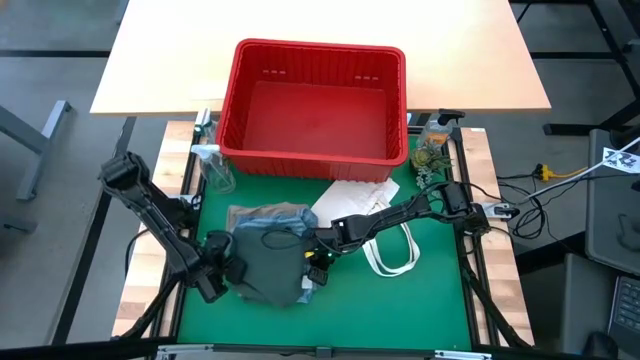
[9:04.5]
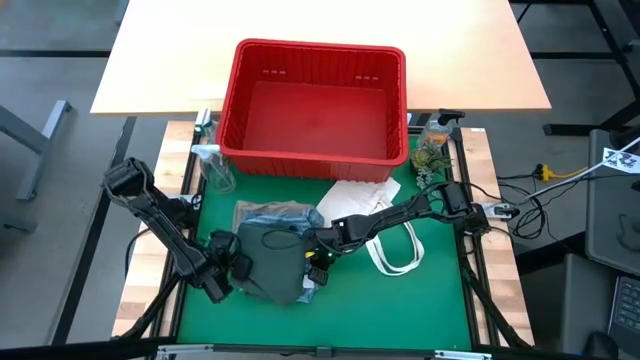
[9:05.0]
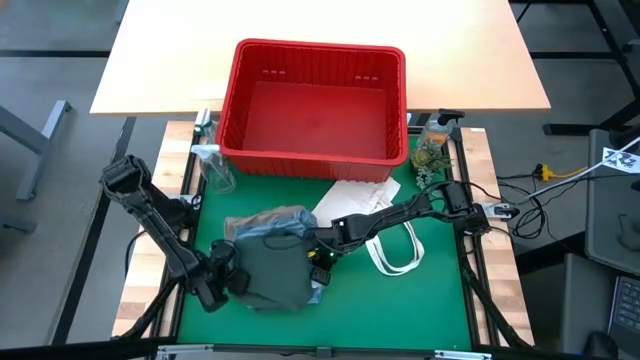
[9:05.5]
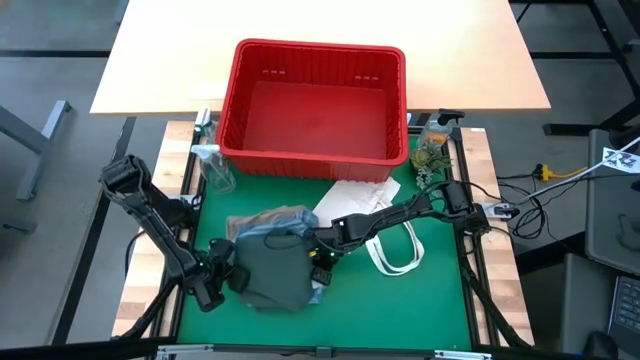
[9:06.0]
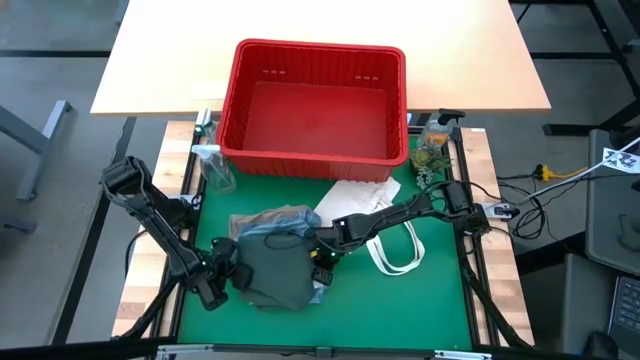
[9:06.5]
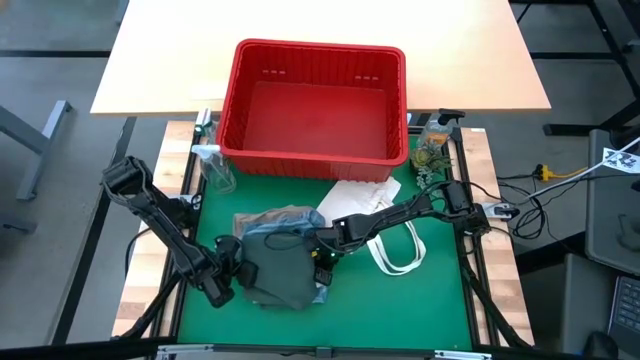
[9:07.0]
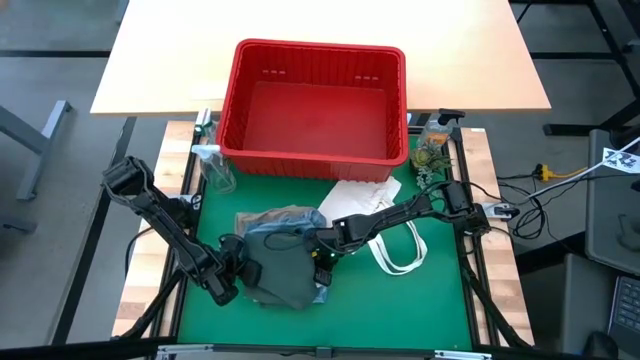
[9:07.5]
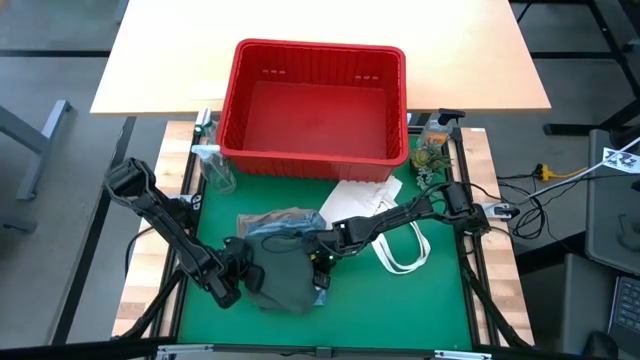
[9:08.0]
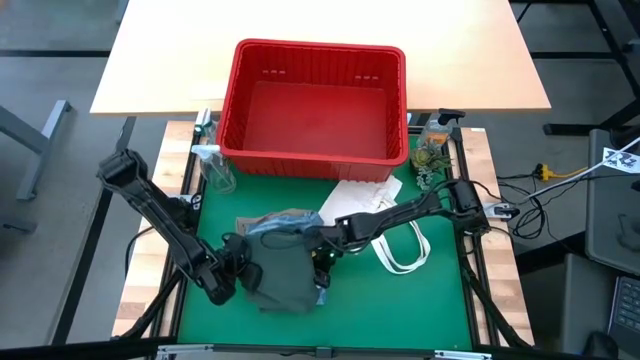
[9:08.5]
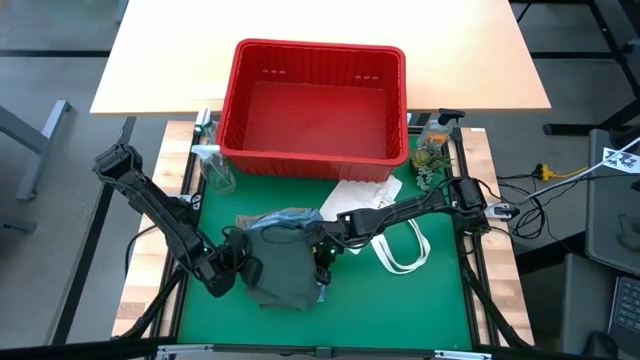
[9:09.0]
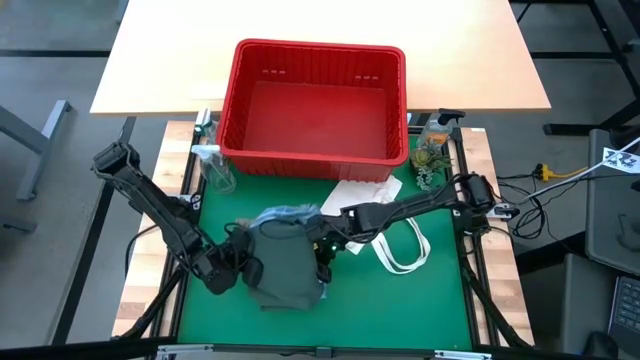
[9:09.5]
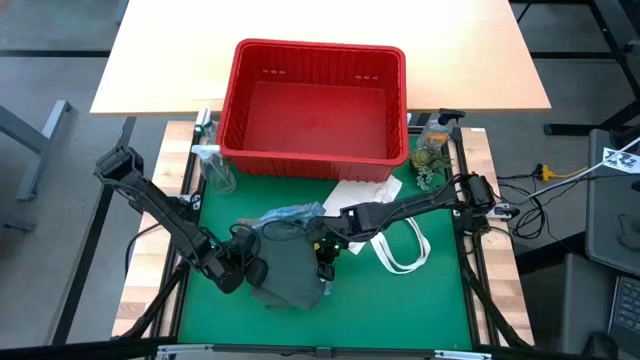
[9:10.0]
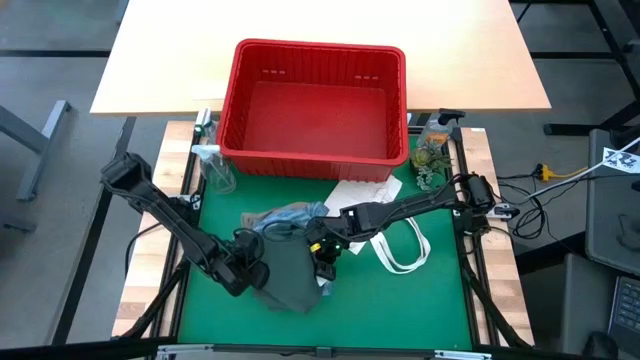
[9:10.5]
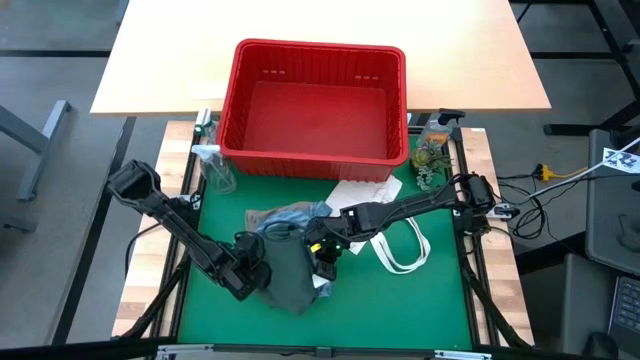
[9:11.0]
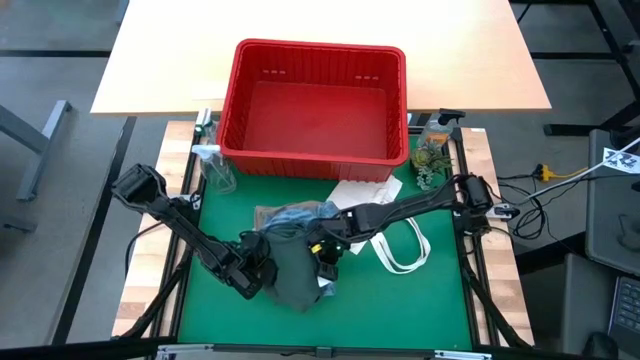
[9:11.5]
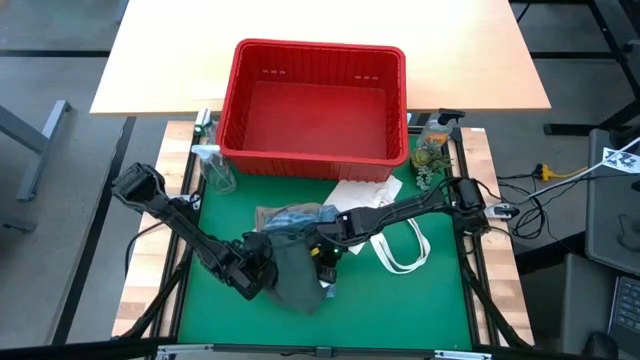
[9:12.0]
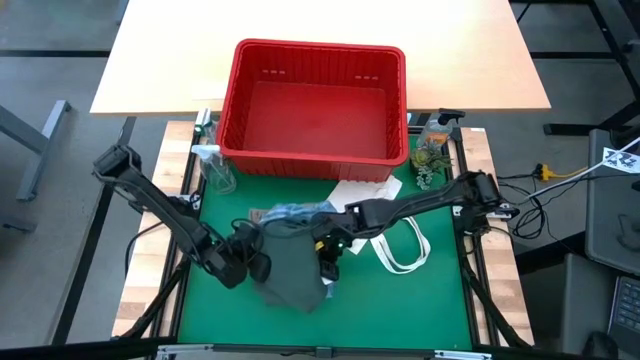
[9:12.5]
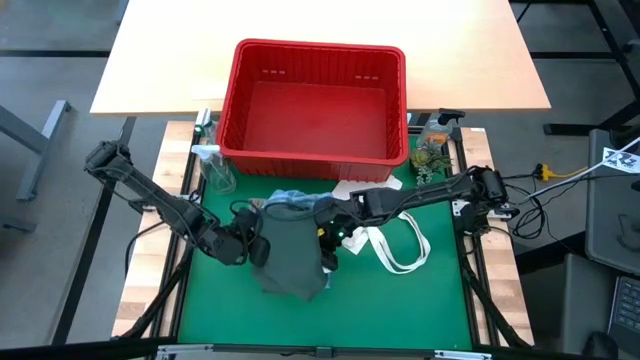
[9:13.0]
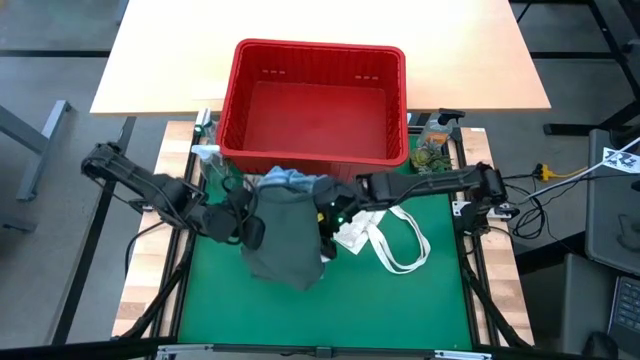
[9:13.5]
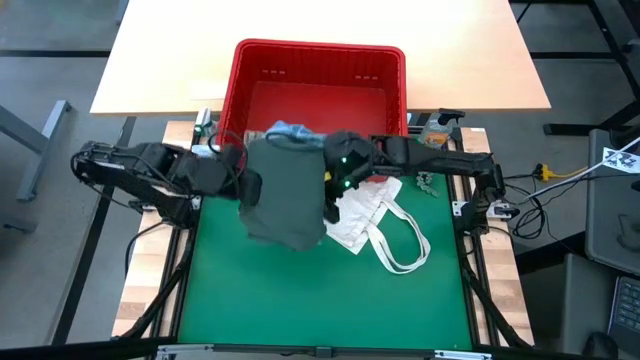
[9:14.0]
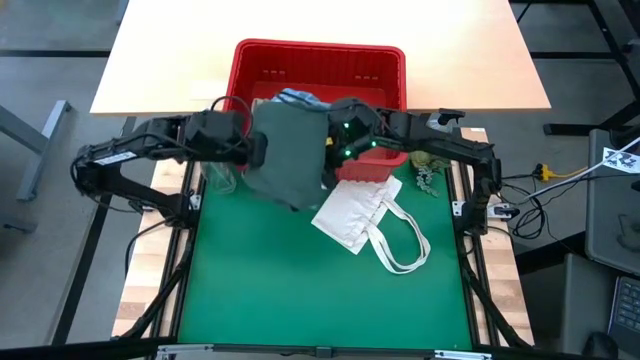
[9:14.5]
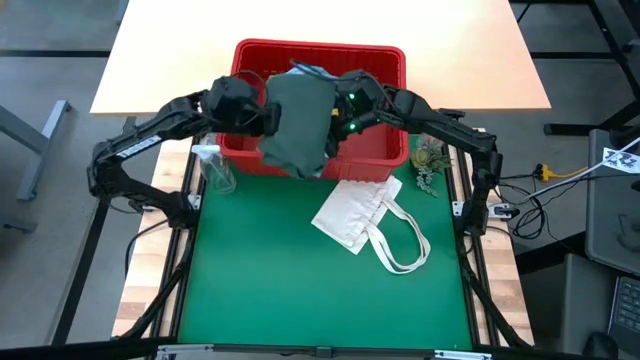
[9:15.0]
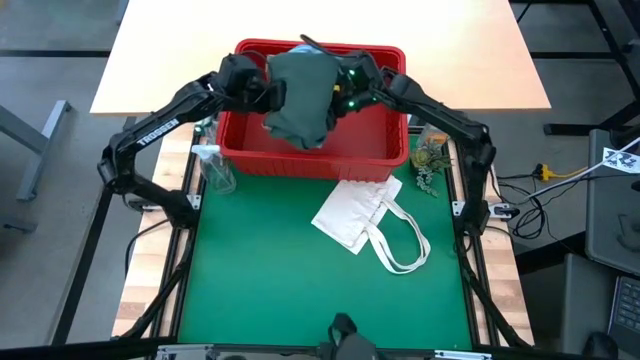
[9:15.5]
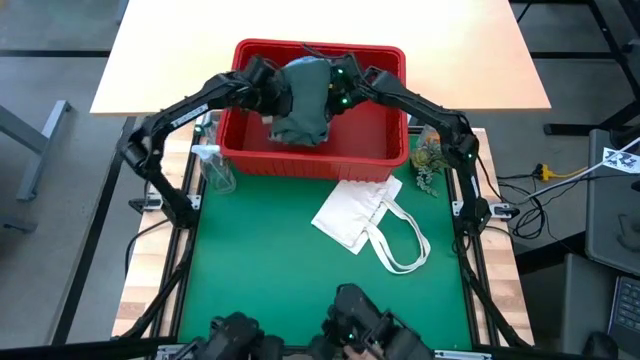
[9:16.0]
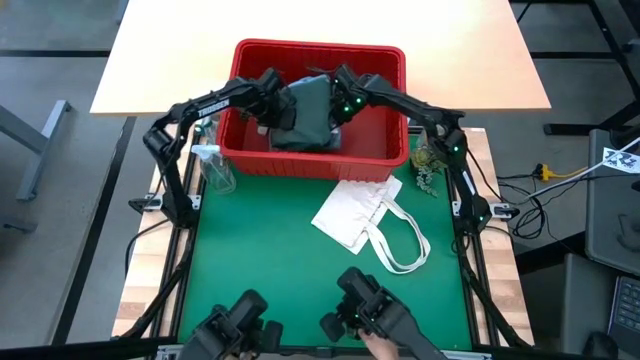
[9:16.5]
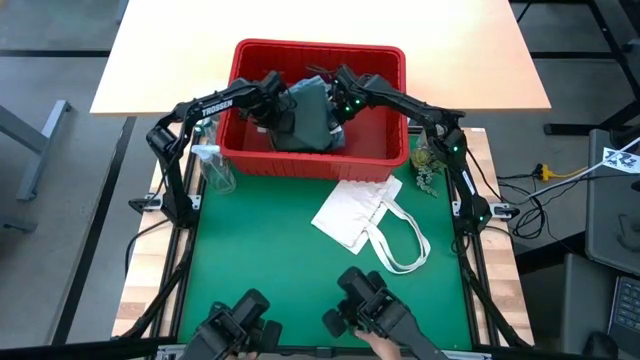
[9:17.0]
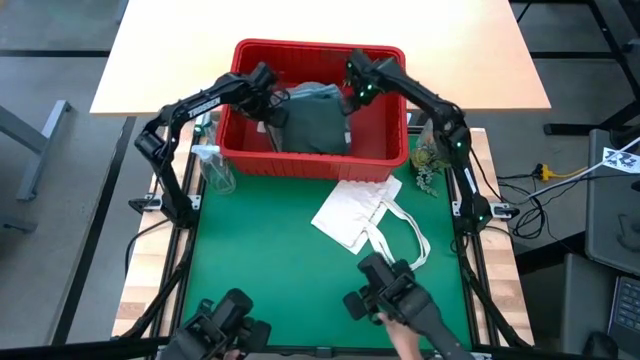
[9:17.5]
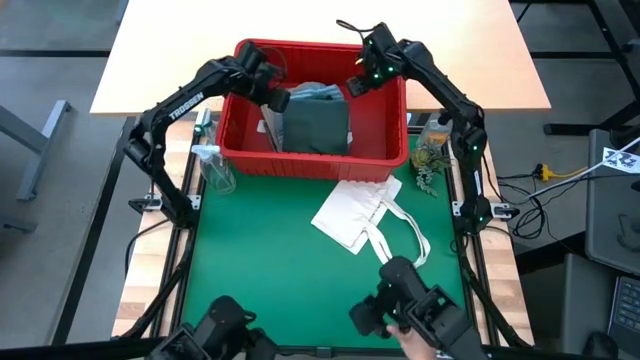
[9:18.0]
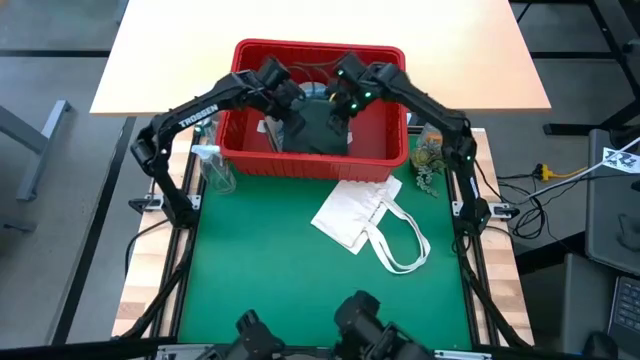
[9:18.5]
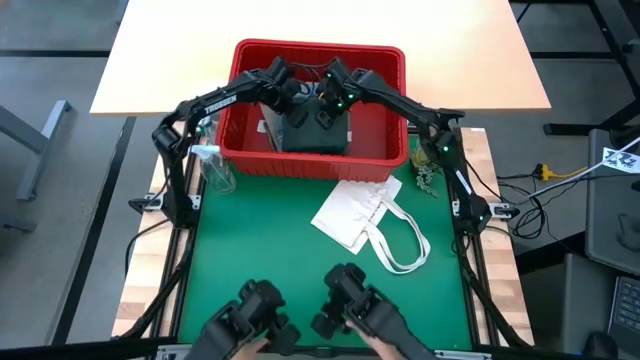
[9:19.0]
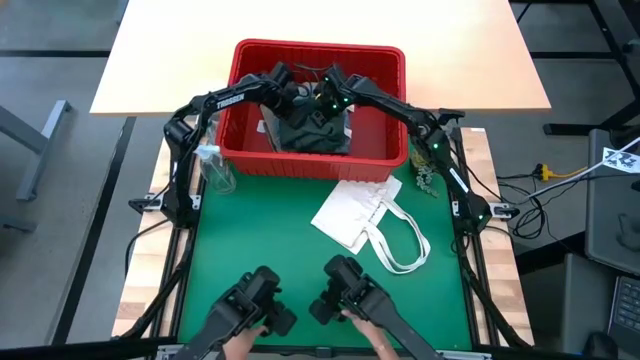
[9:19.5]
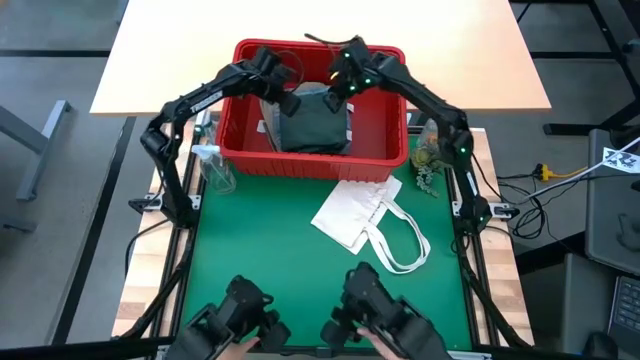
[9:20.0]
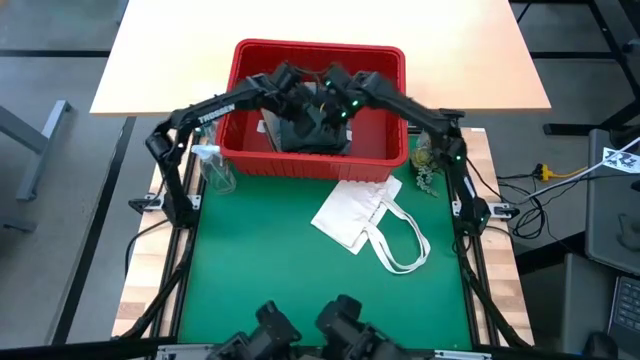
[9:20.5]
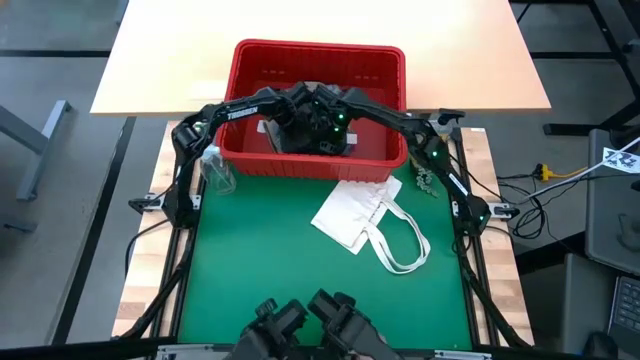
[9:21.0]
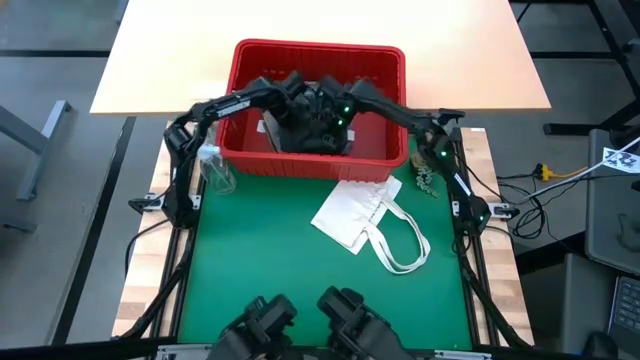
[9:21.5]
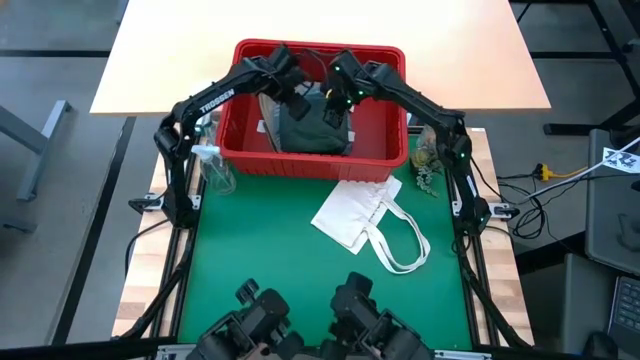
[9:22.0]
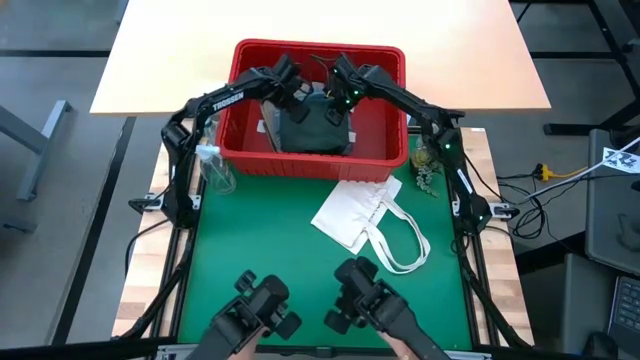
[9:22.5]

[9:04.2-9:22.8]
Task: Fold Laundry from Bin
Put all the stacked clothes into the red bin
